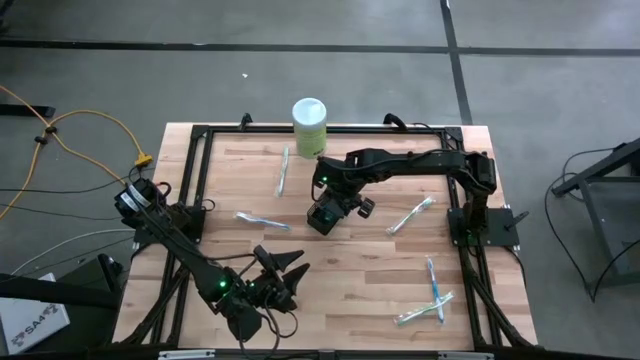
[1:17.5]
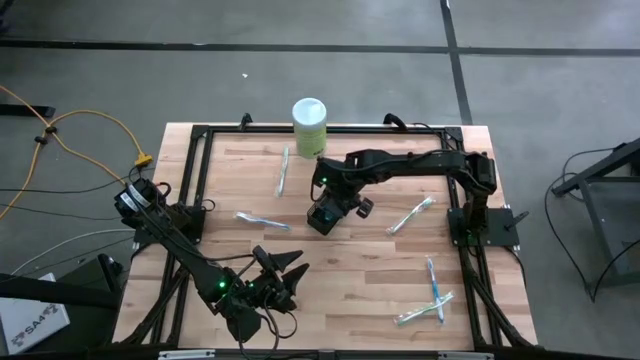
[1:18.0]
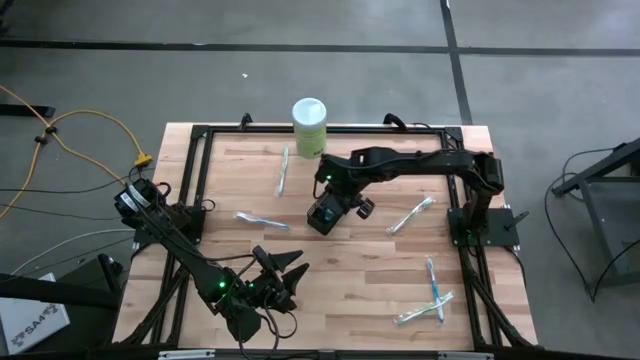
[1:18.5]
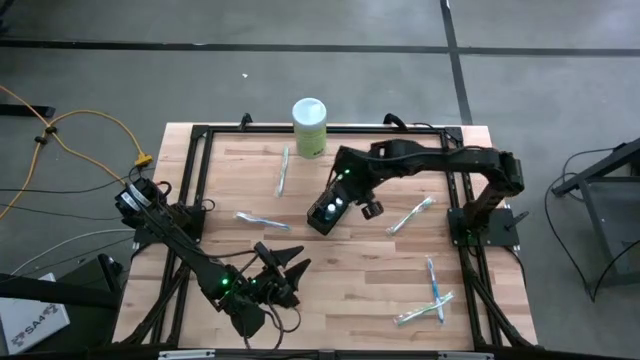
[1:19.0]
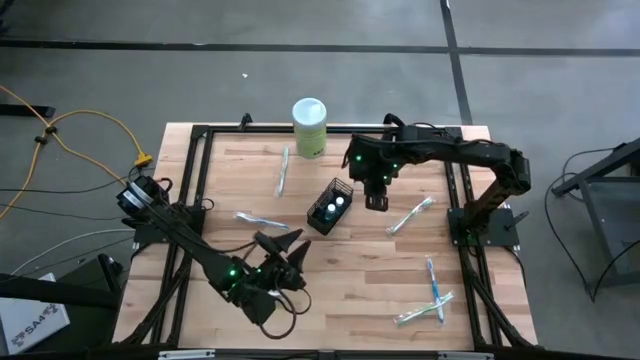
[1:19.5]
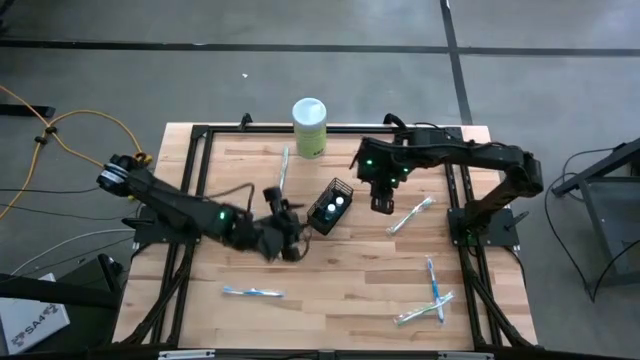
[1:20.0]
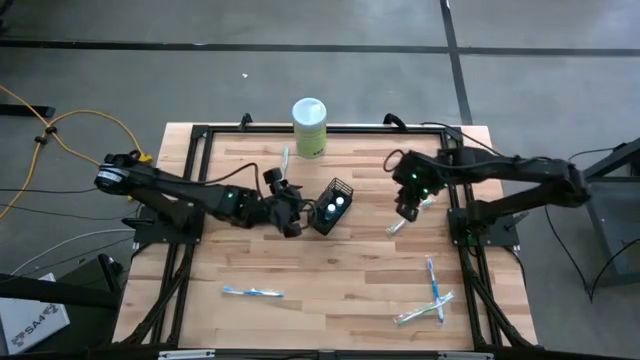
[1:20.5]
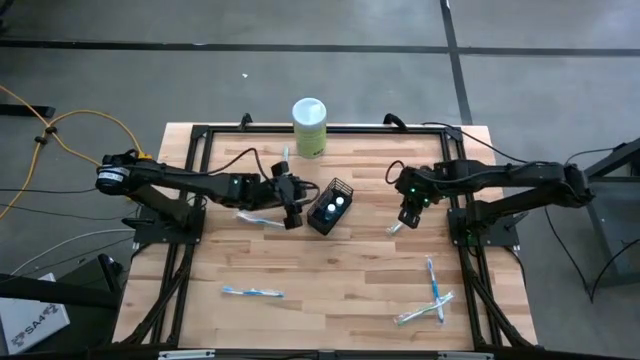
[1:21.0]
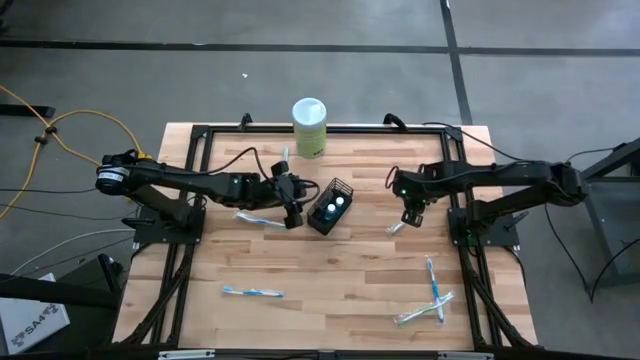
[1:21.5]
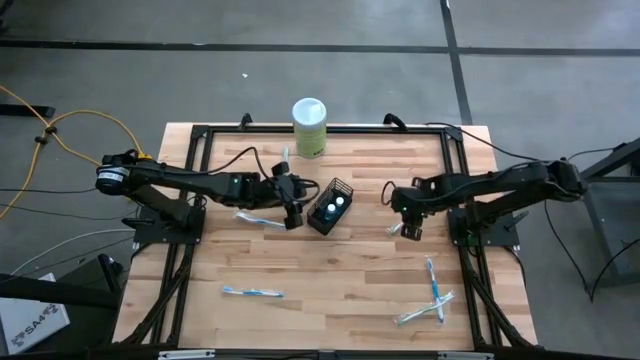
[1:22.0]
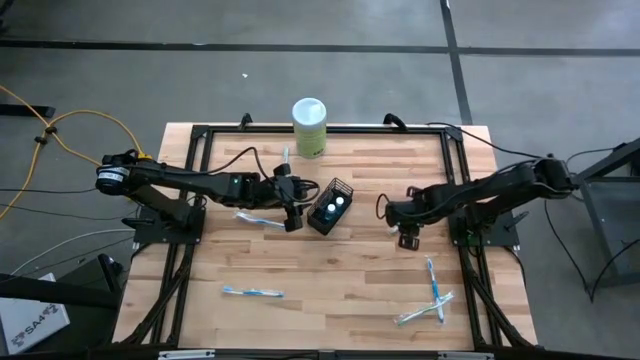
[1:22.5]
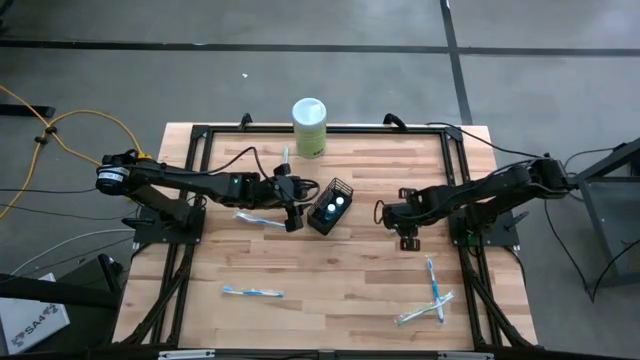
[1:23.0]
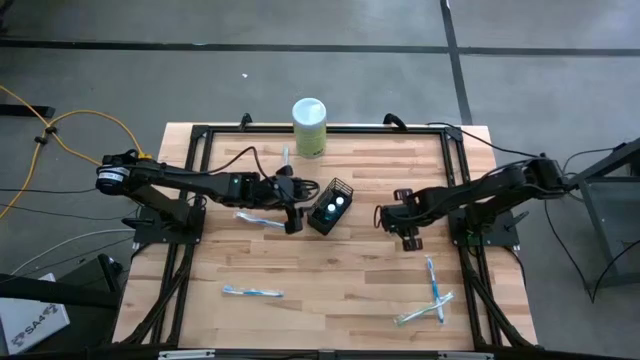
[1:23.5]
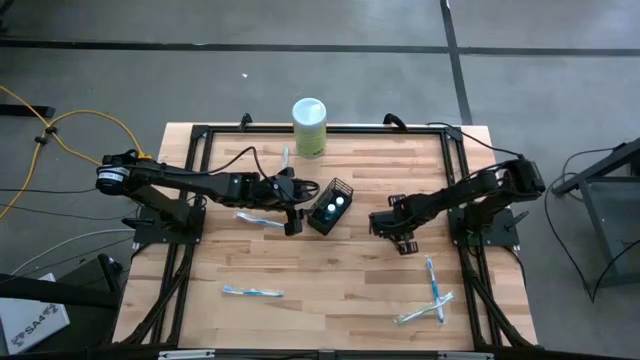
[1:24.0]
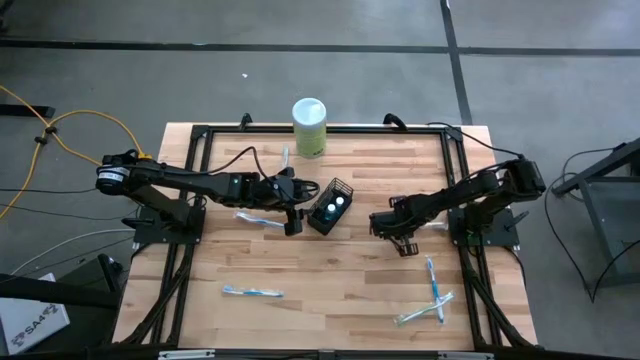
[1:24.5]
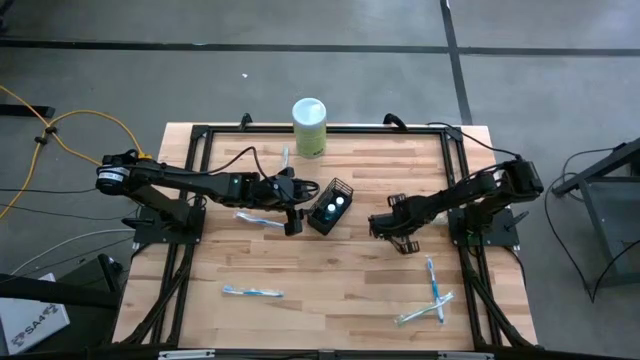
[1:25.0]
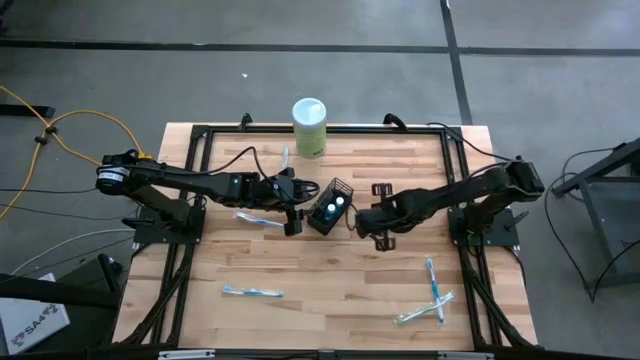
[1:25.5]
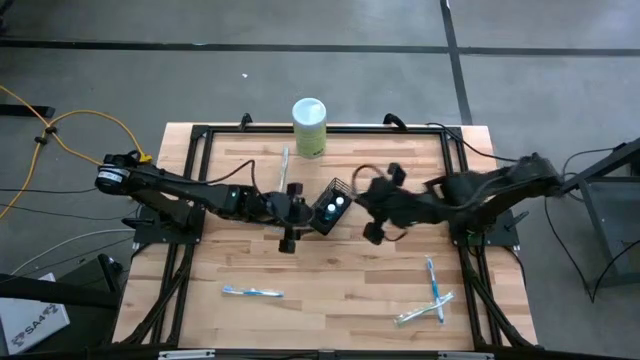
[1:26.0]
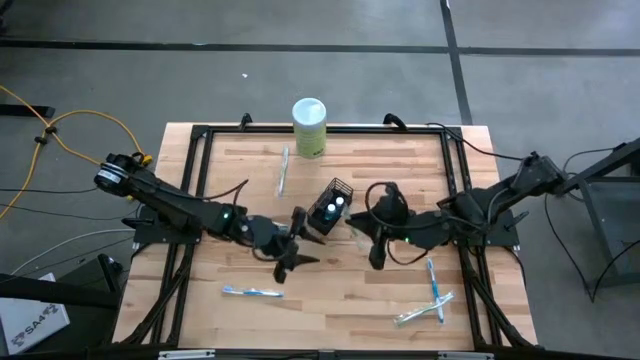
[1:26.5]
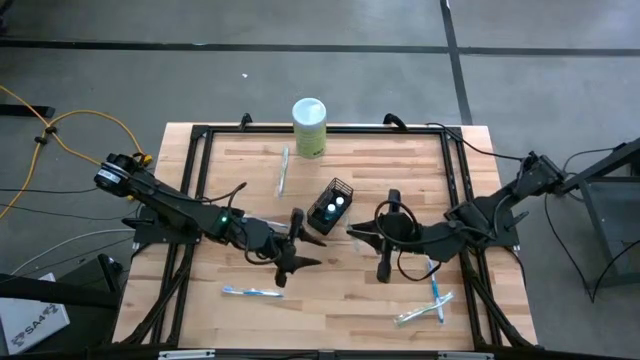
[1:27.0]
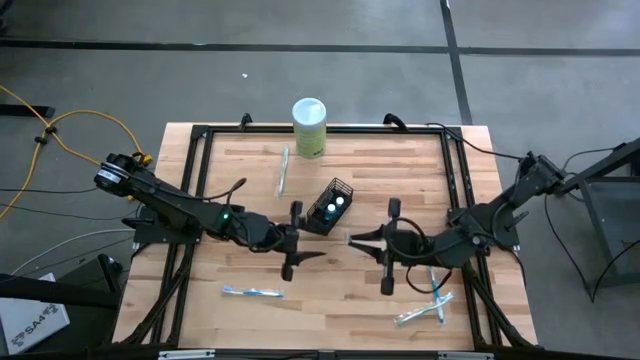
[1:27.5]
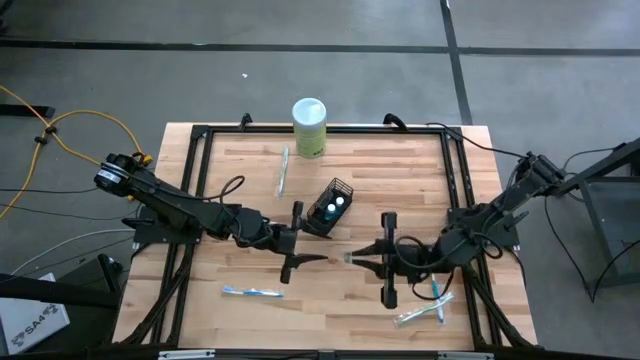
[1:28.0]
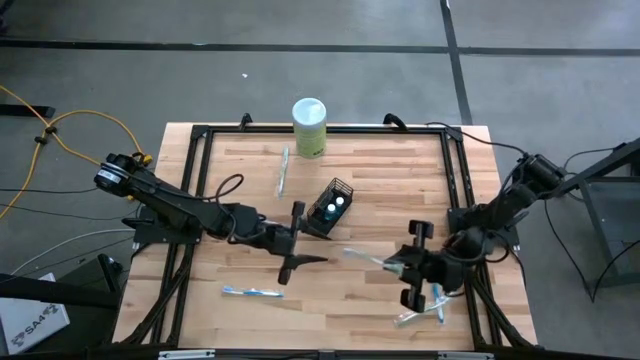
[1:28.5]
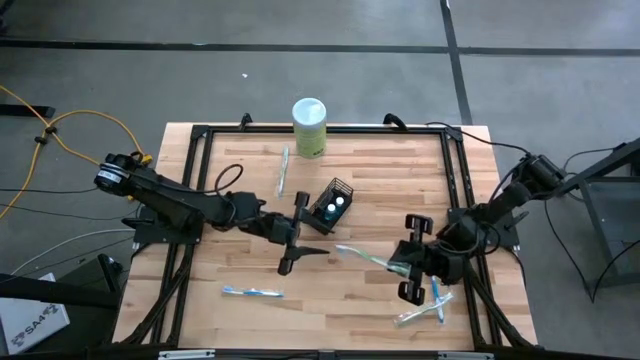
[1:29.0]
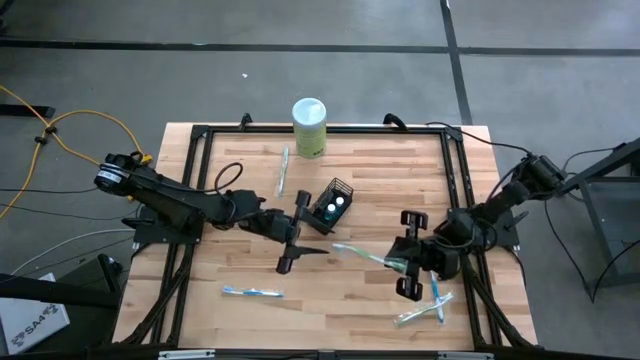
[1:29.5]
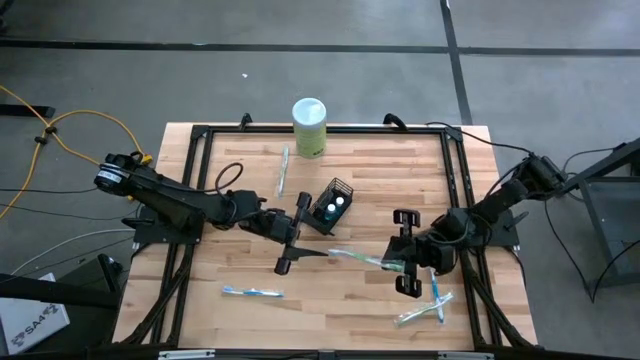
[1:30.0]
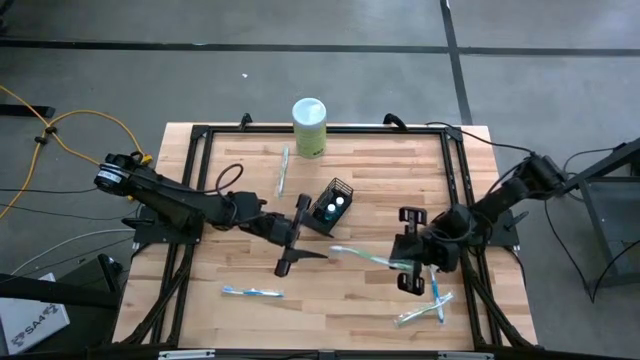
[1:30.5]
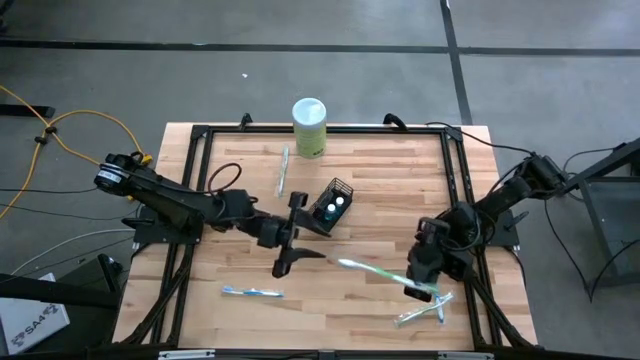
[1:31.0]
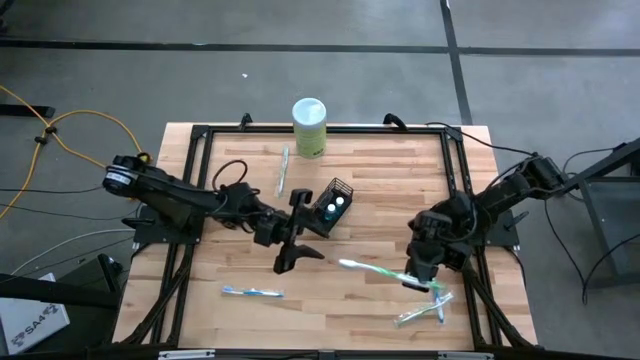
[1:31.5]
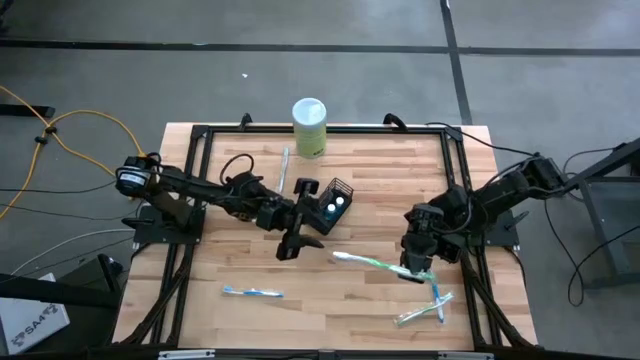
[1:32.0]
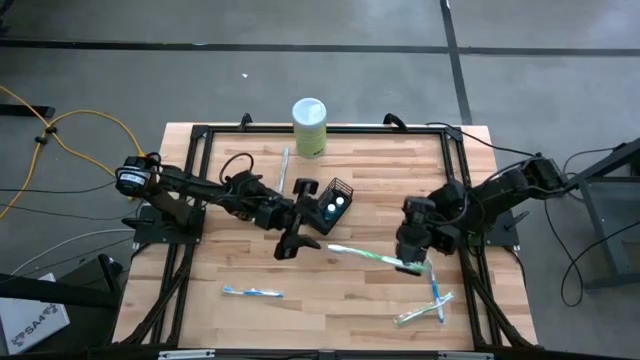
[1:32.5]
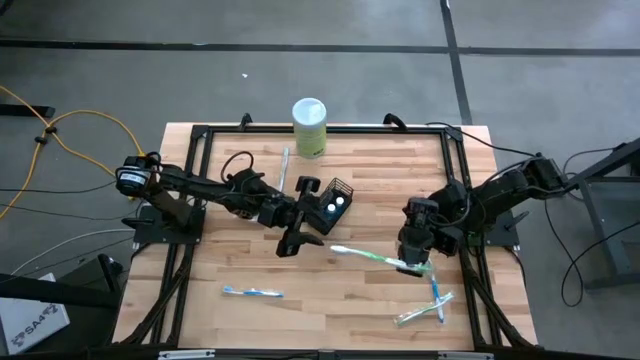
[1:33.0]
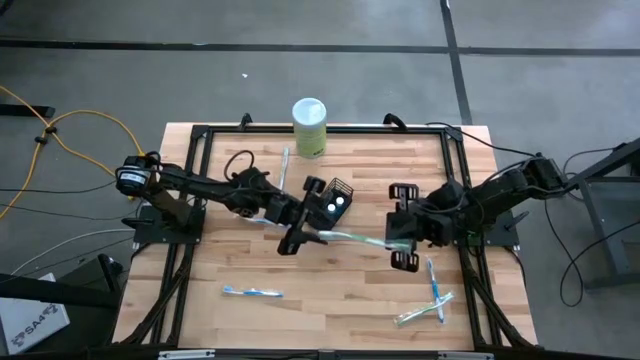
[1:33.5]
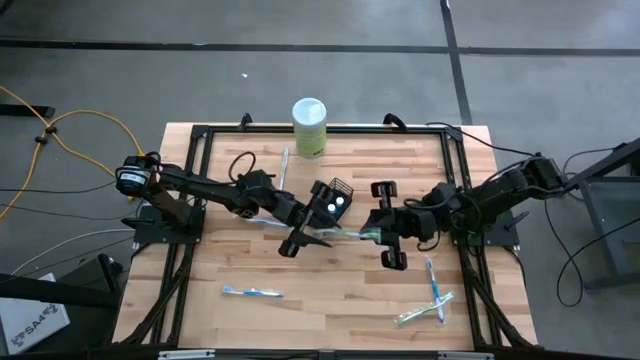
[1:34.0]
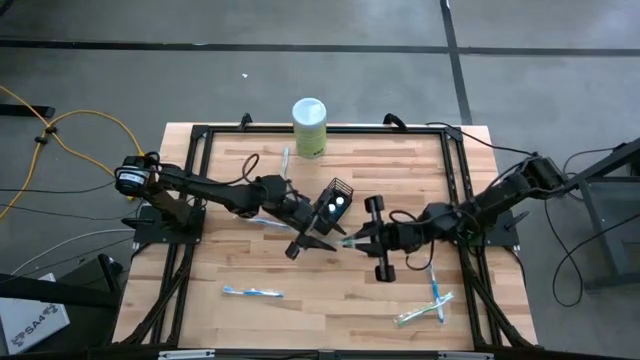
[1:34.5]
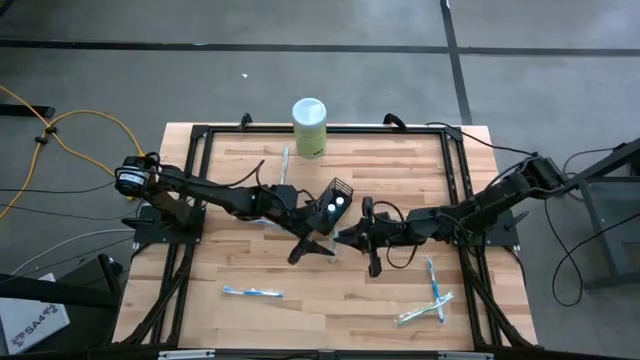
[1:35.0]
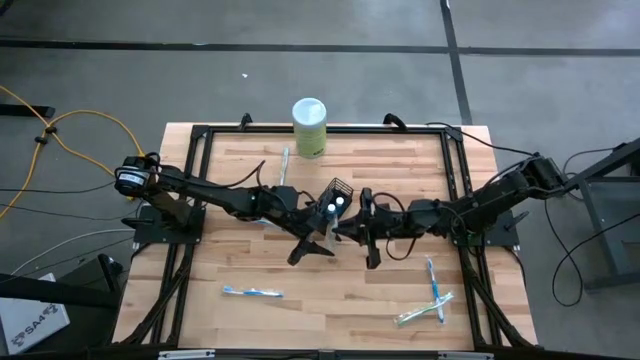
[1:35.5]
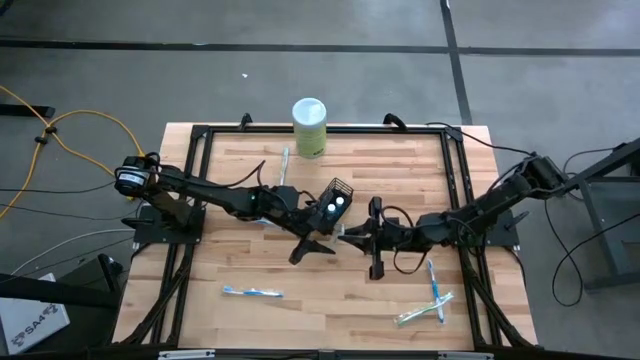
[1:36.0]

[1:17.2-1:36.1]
Task: Pick & Place toothbrushing station
Put the top right green toothbrush into the right section of the black wire organizer
